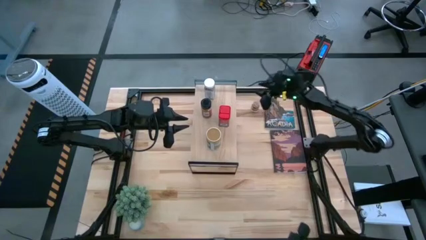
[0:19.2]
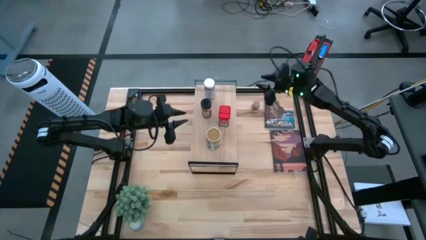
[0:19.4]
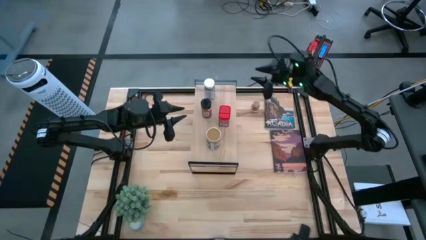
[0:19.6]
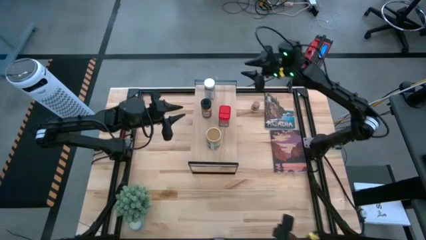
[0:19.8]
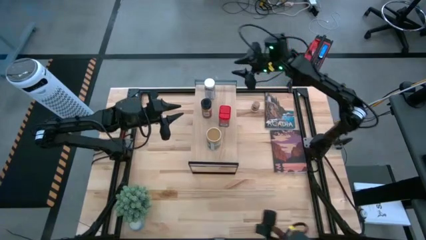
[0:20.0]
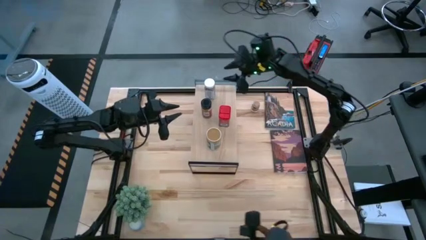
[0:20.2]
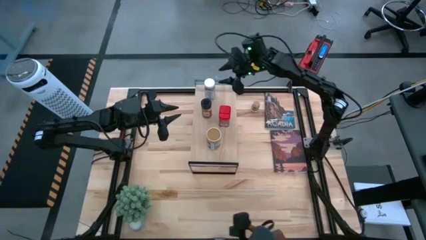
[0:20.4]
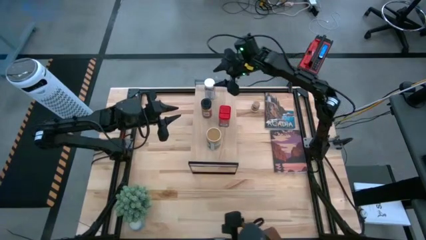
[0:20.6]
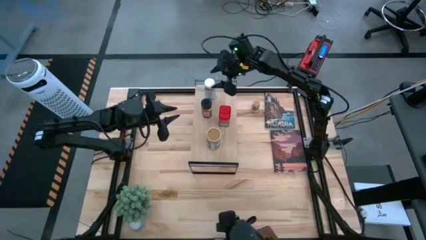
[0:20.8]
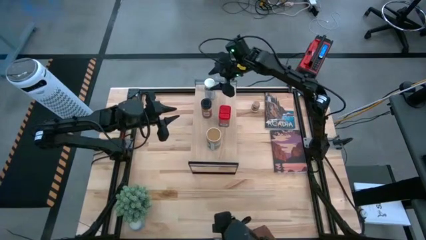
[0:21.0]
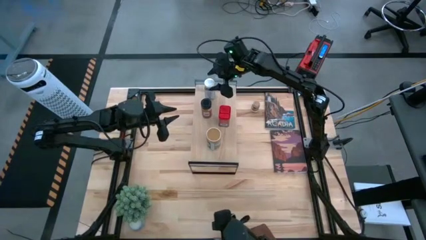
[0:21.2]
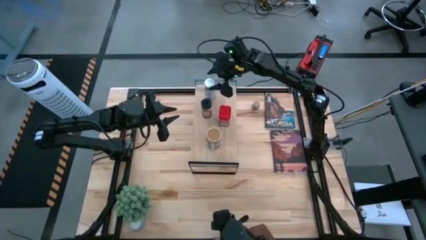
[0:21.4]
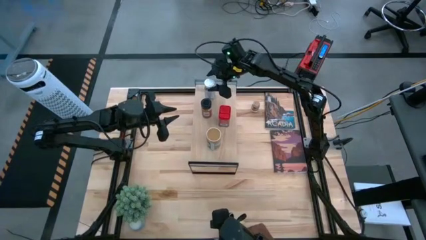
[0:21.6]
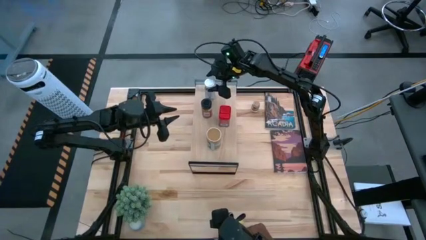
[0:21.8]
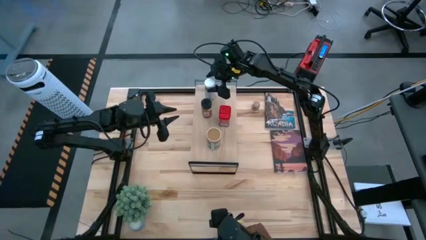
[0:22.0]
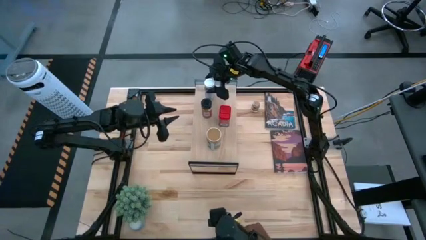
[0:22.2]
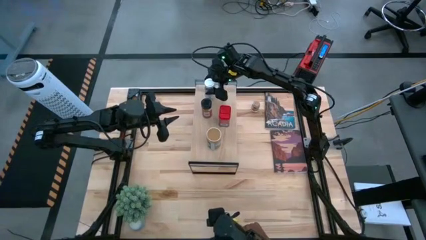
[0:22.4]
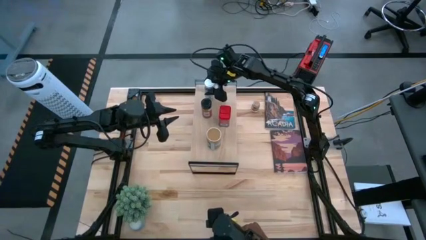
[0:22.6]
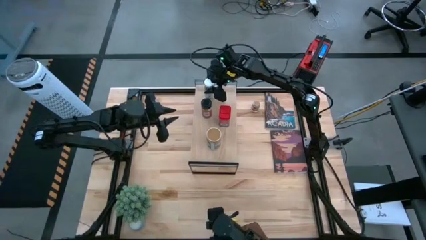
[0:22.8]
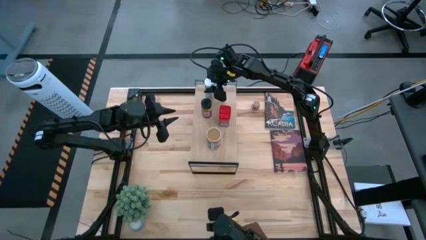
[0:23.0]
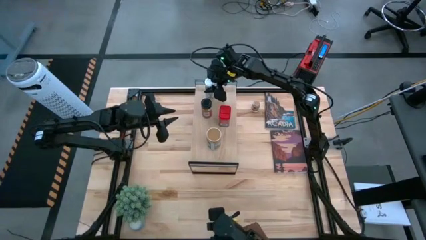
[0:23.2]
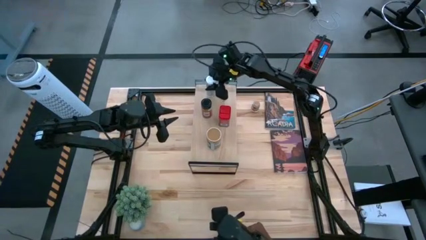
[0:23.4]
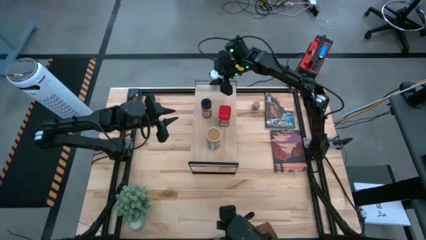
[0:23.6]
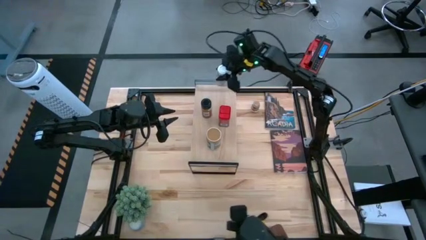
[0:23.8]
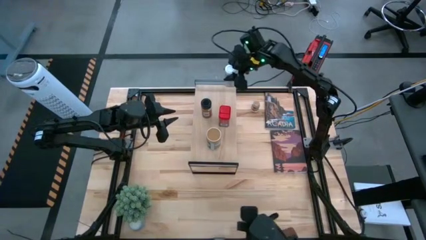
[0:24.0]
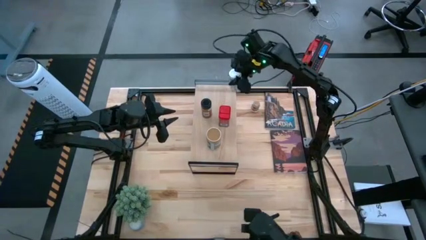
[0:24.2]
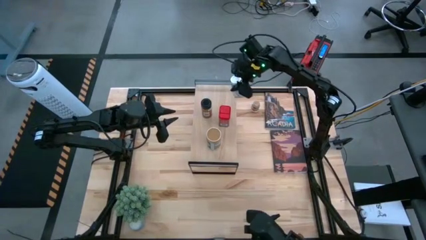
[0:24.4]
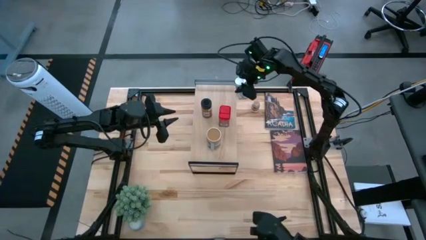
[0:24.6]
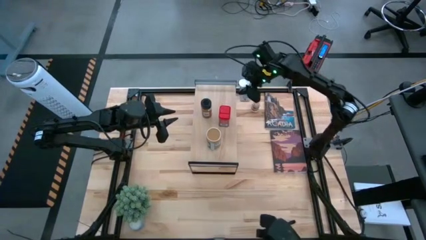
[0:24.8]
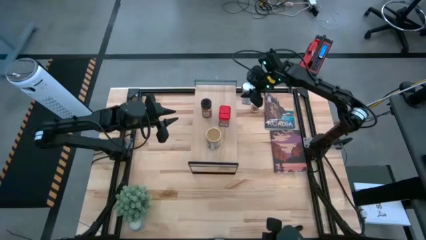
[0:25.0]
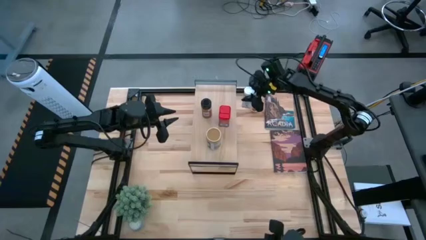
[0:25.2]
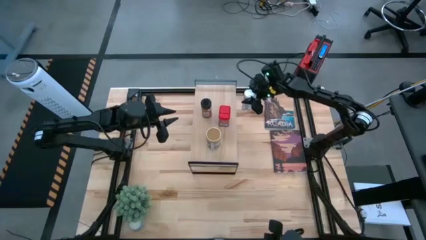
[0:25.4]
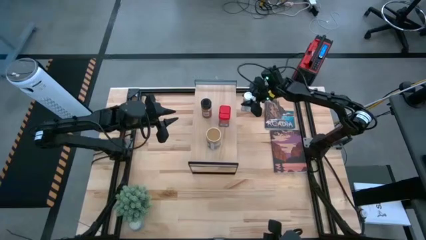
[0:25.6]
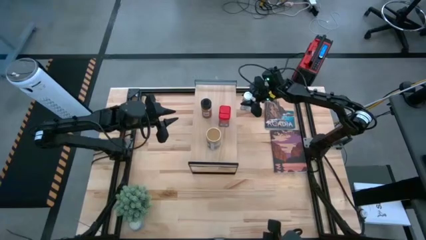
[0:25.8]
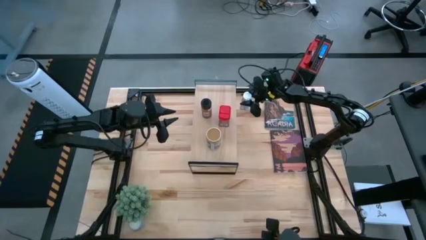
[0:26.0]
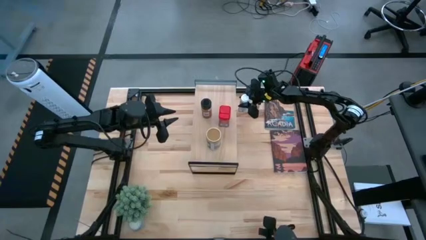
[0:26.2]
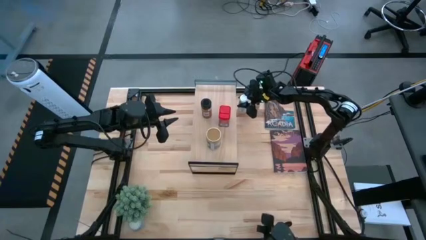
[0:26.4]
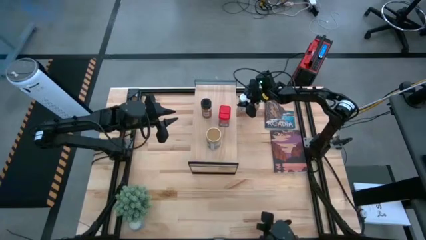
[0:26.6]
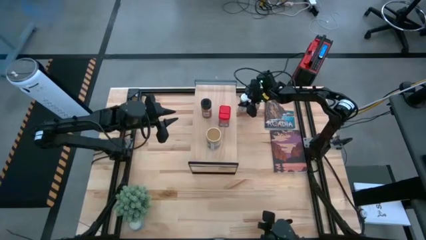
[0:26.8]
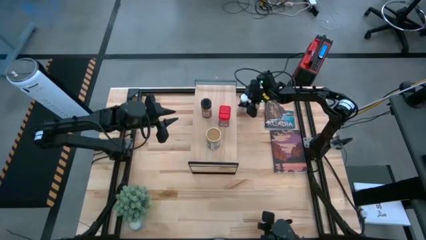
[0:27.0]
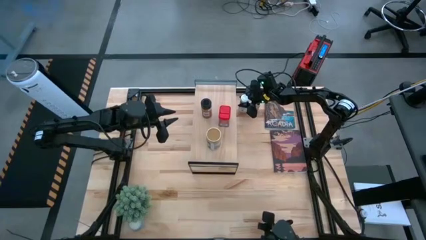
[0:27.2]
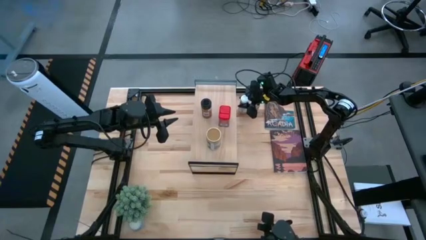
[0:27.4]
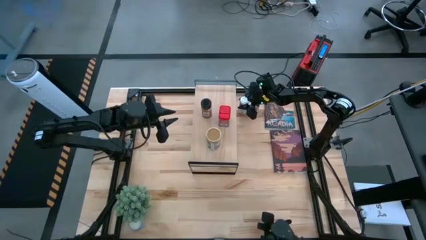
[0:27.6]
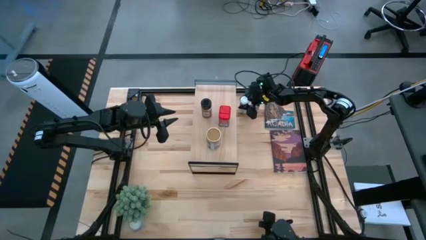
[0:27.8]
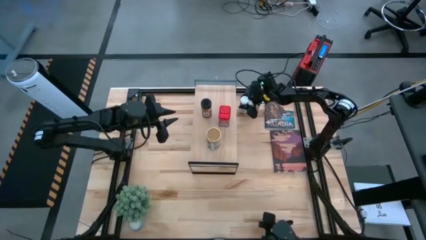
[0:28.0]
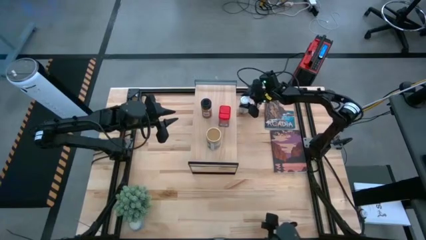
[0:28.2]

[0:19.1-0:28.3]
Task: Shelf spices
Remove the white seasoning bottle from the shelf

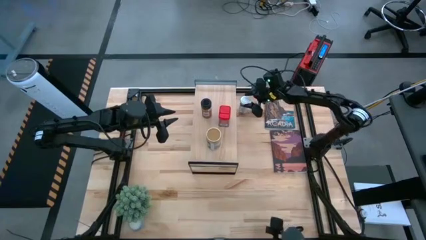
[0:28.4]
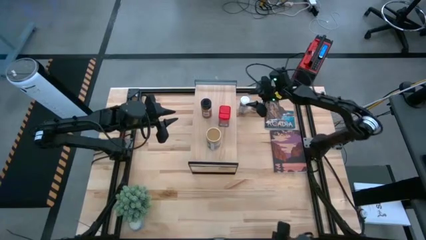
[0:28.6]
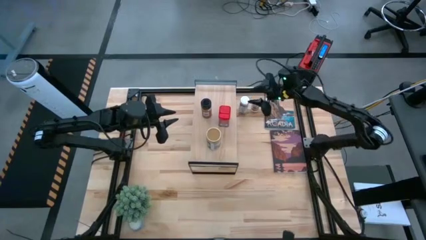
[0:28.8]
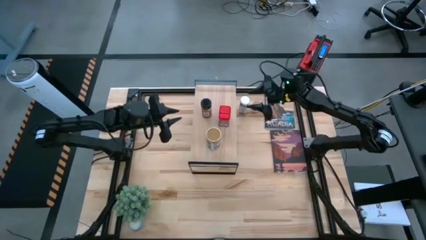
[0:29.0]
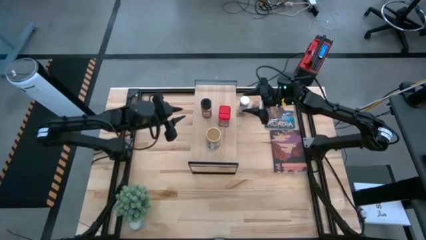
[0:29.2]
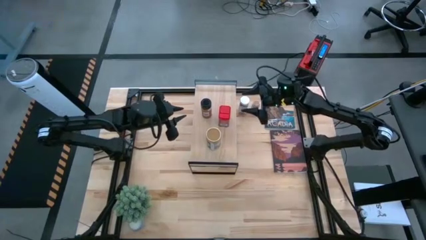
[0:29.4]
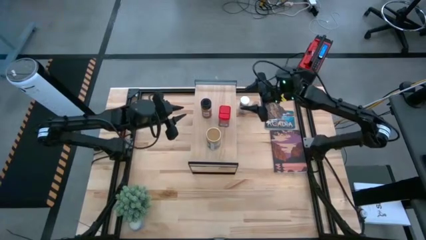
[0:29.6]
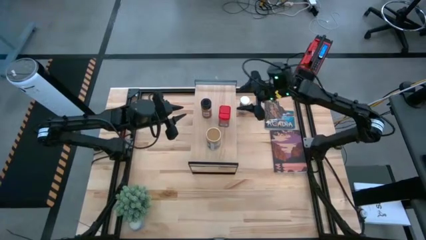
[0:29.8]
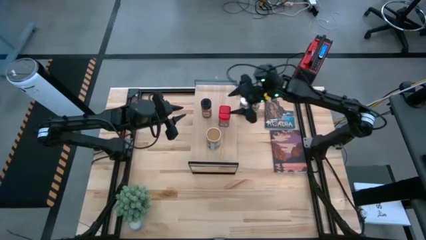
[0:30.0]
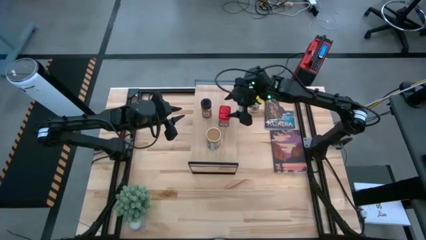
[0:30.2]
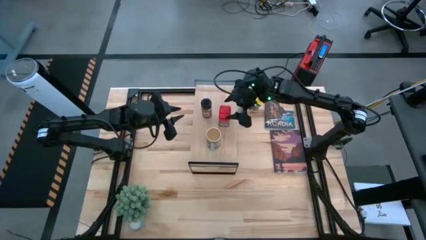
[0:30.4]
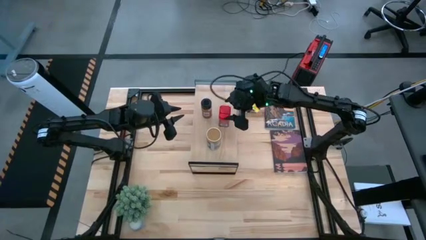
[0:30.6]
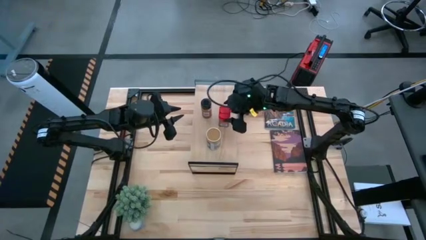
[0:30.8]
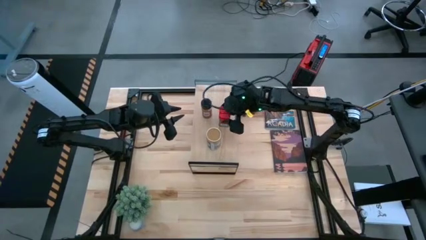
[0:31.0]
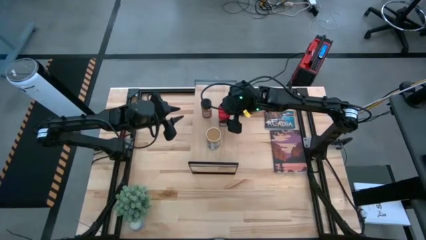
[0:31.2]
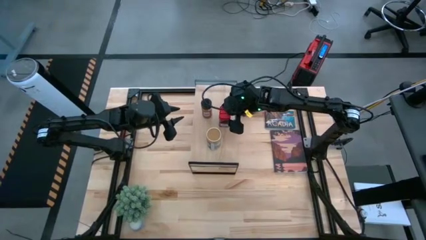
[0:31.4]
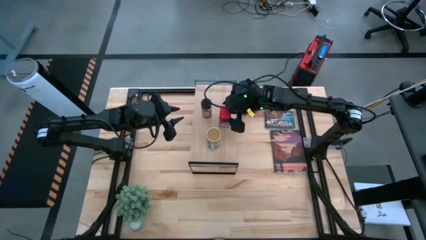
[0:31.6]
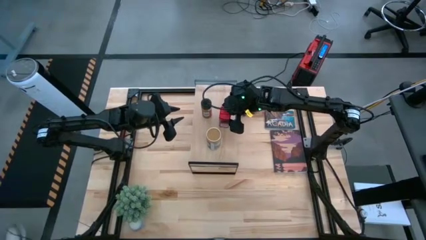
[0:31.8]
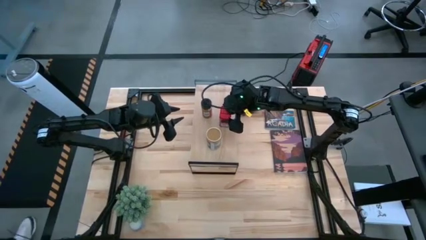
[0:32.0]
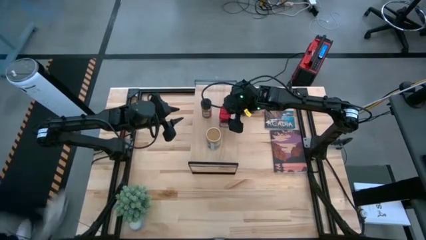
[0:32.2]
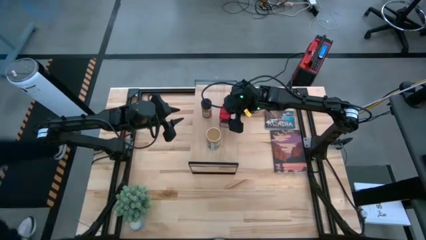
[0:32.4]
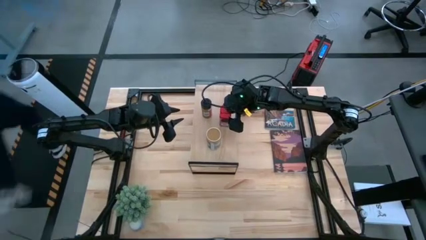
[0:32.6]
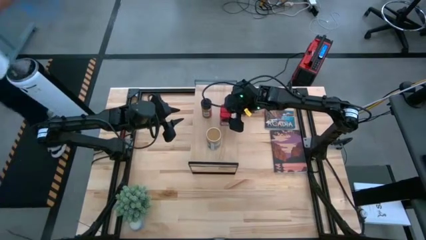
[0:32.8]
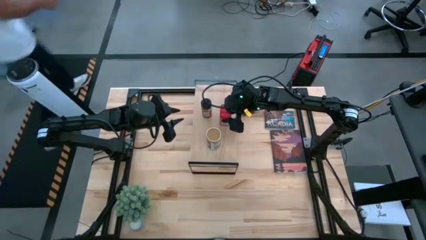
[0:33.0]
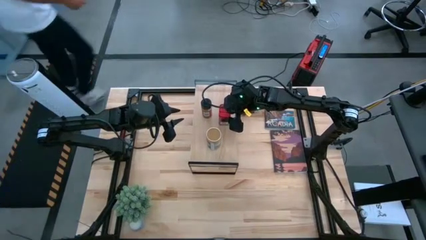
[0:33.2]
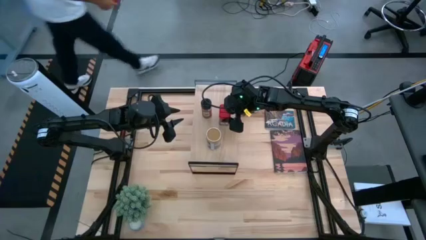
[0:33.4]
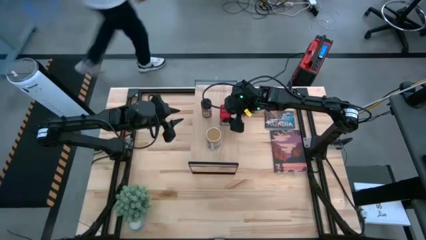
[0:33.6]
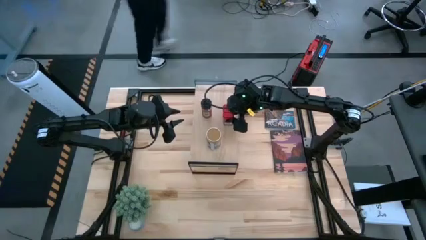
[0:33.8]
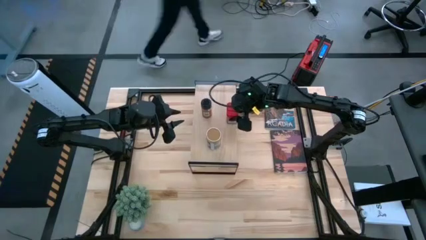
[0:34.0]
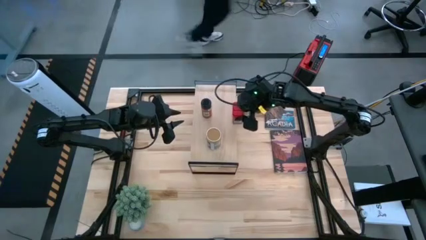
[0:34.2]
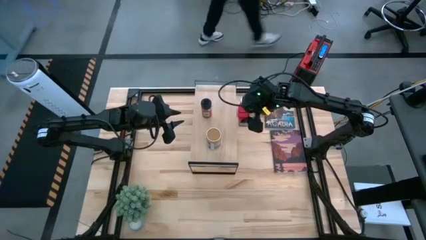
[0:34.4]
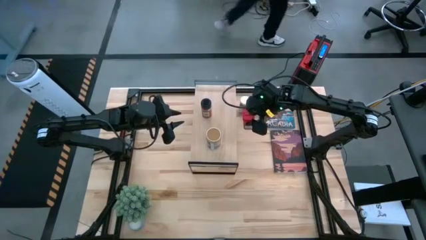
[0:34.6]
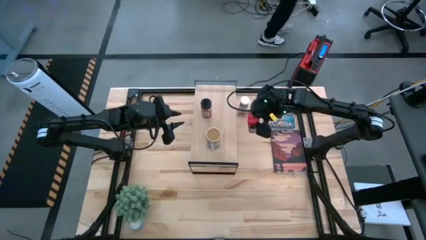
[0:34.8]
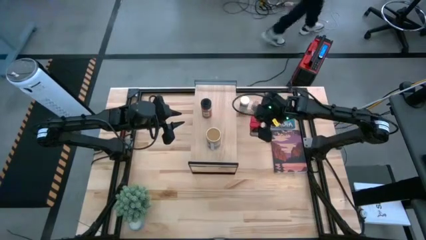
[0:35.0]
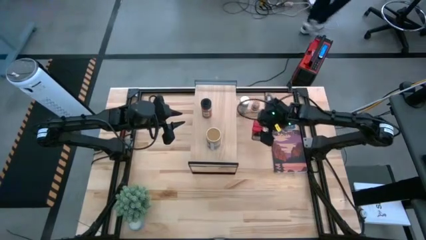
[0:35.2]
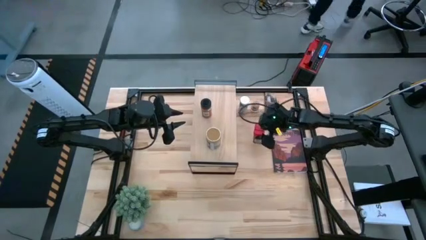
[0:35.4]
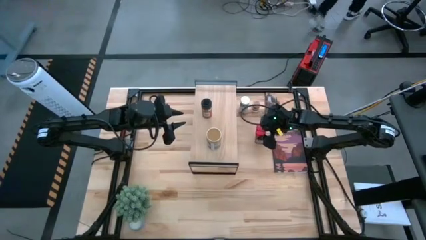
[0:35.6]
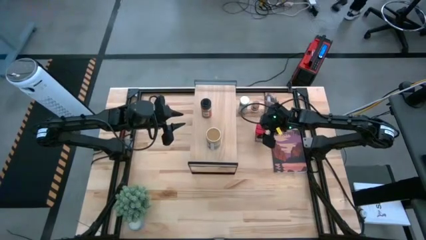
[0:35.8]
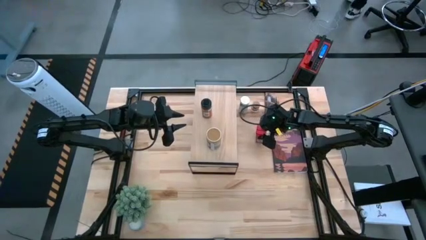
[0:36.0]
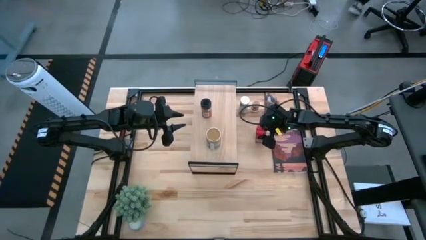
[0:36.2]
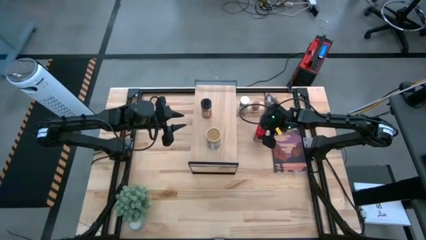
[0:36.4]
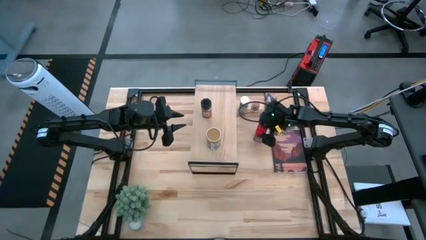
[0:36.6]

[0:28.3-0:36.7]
Remove the red seasoning can from the shelf
